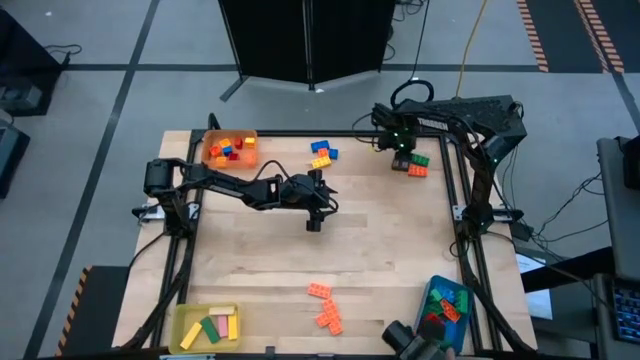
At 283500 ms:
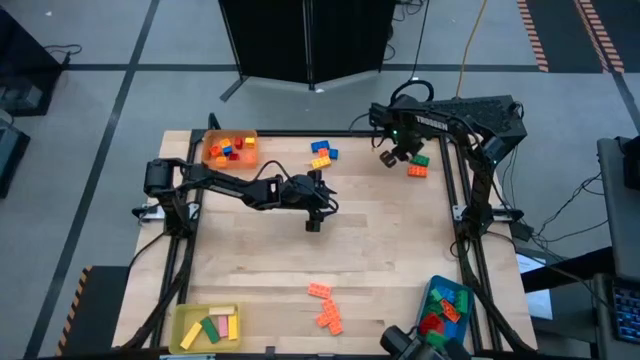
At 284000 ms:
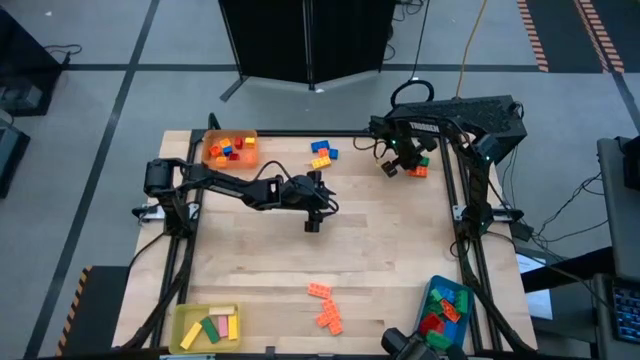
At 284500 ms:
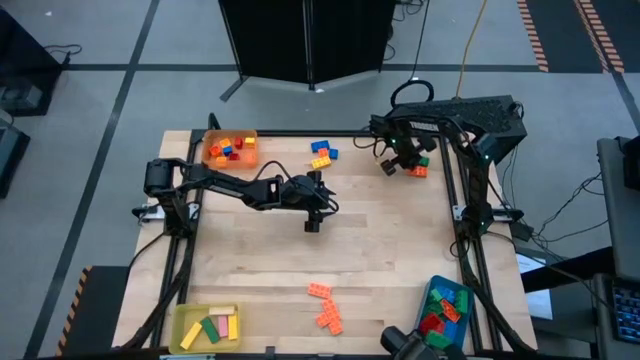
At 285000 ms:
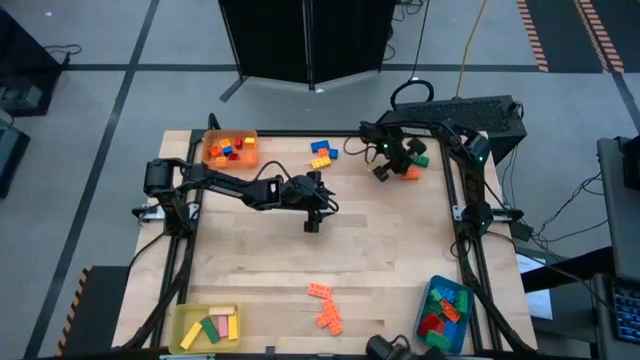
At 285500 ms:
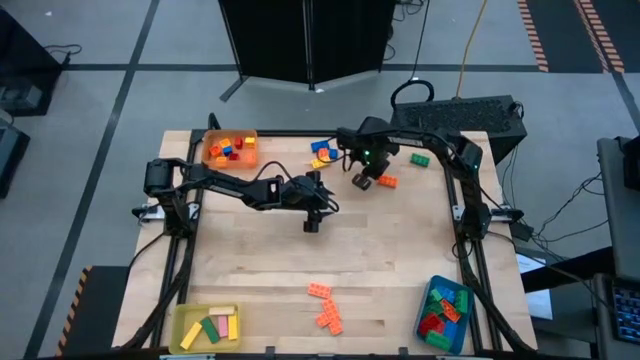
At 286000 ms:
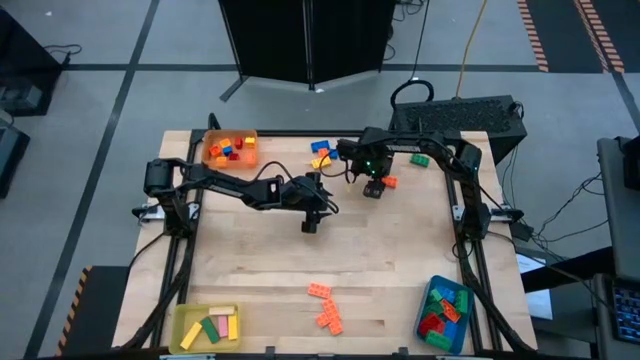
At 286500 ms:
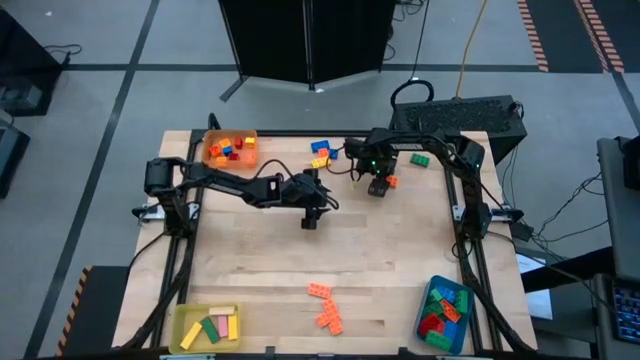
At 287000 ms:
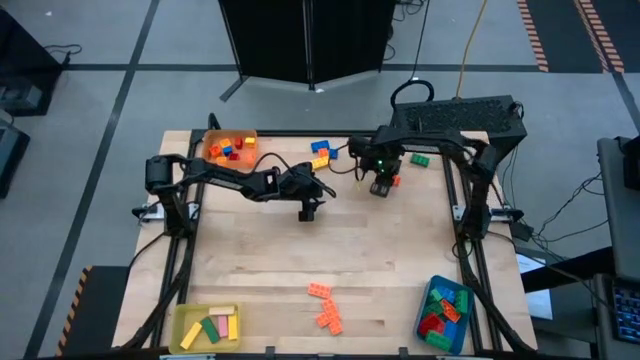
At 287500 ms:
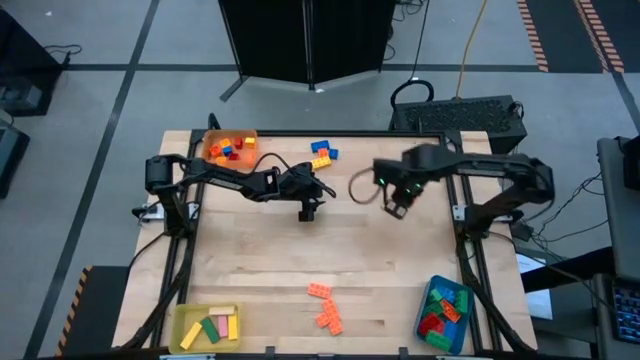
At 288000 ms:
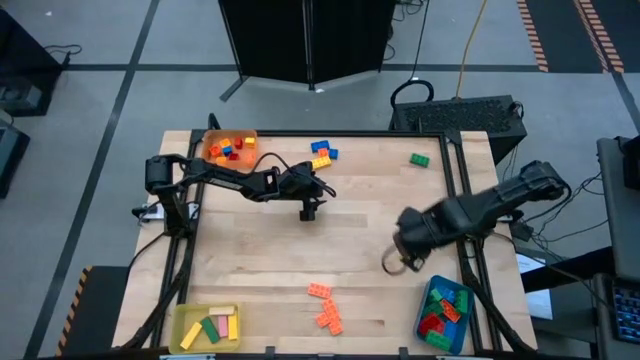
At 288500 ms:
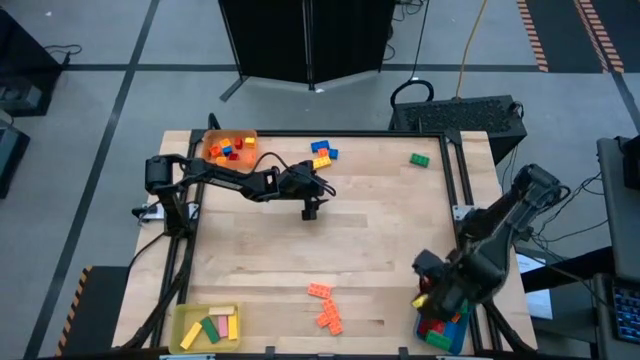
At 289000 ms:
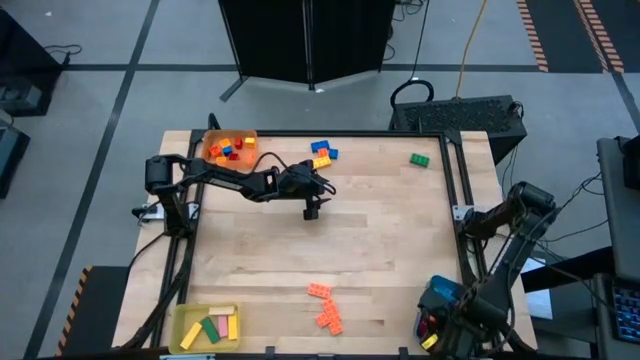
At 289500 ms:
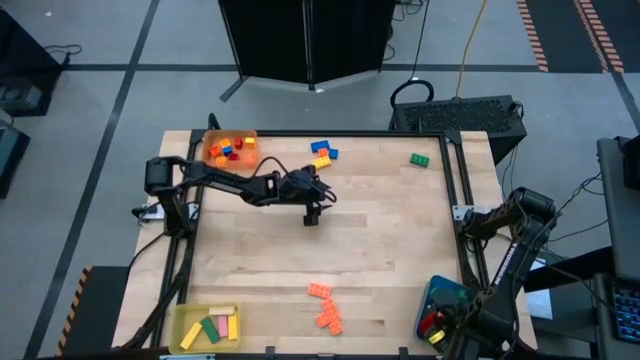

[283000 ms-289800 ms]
Task: Sort blocks by size
Put the orange 8 stud game piece into the blue bin

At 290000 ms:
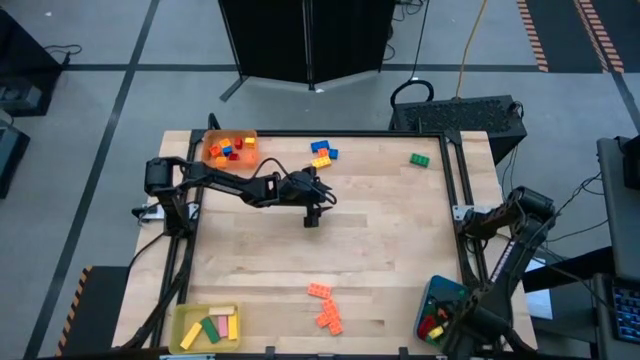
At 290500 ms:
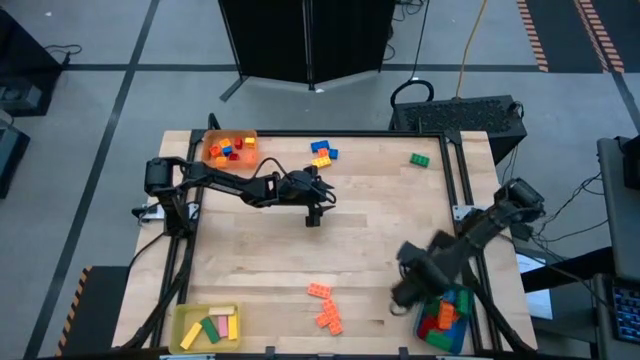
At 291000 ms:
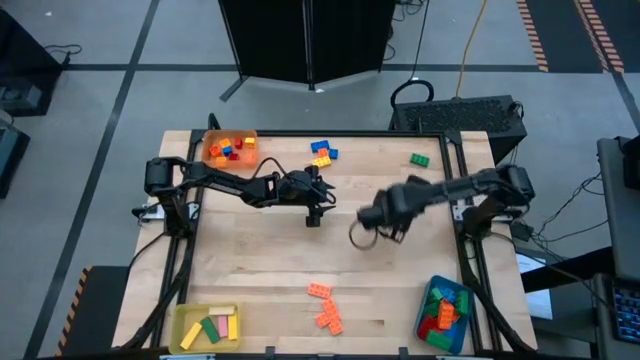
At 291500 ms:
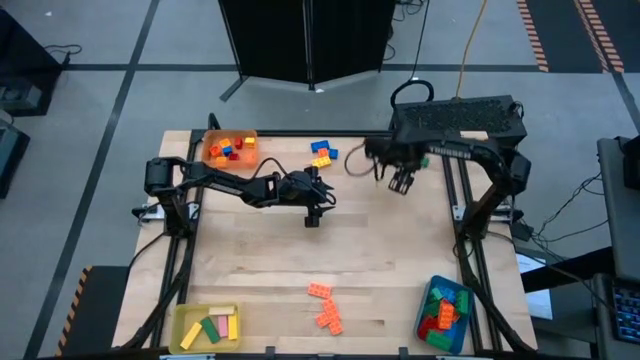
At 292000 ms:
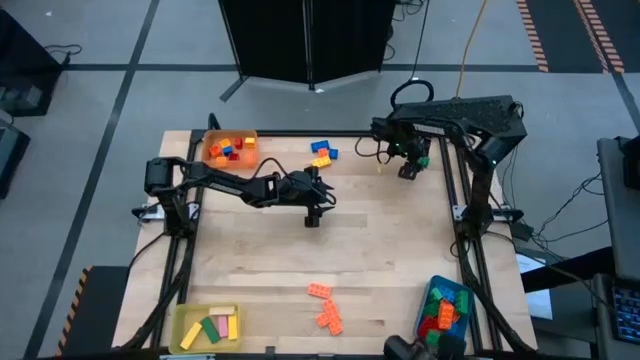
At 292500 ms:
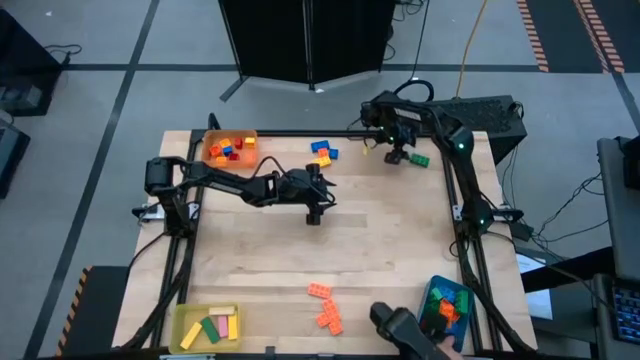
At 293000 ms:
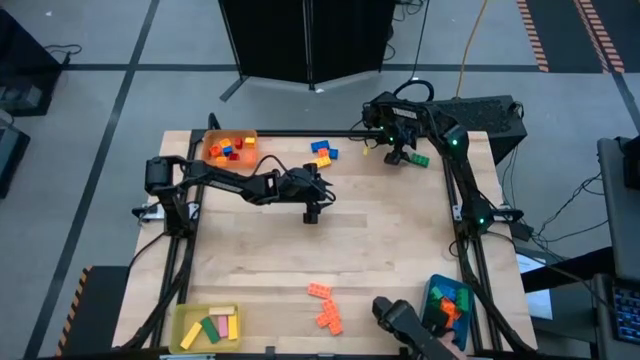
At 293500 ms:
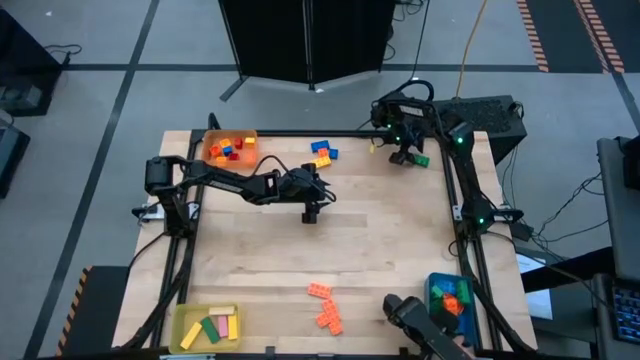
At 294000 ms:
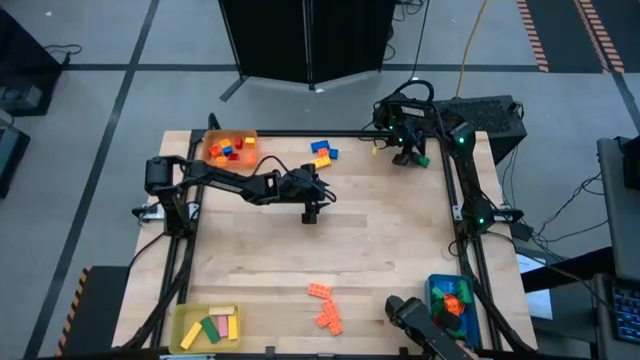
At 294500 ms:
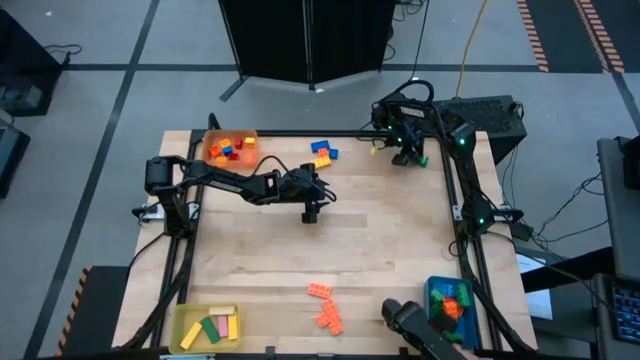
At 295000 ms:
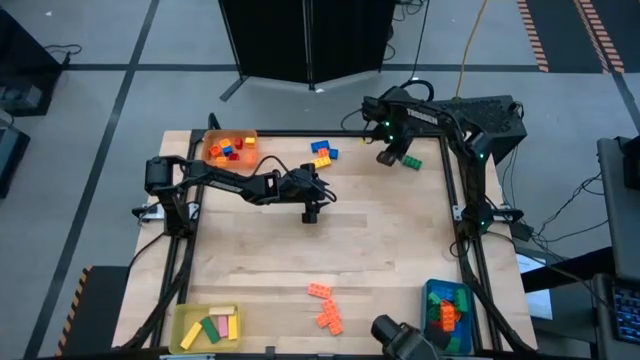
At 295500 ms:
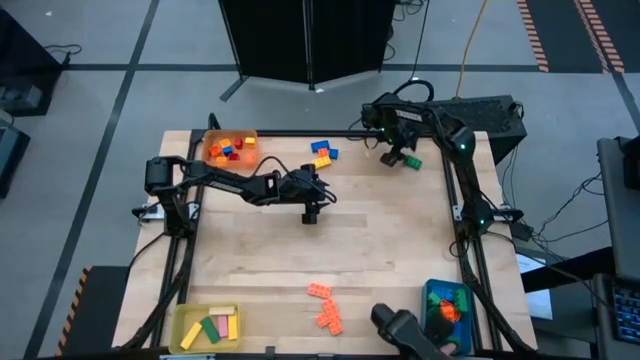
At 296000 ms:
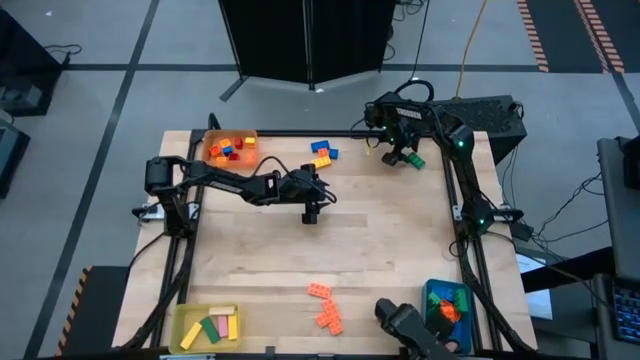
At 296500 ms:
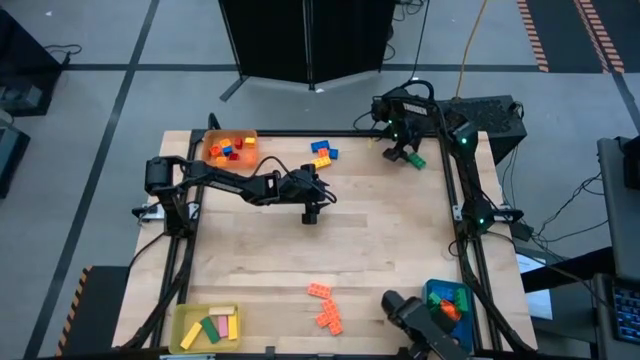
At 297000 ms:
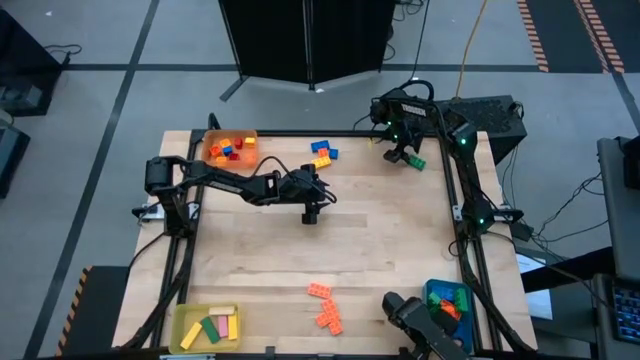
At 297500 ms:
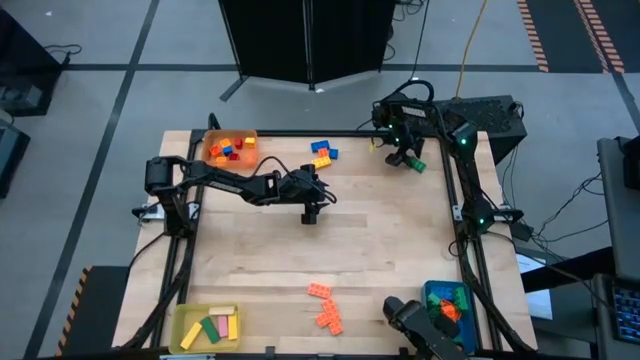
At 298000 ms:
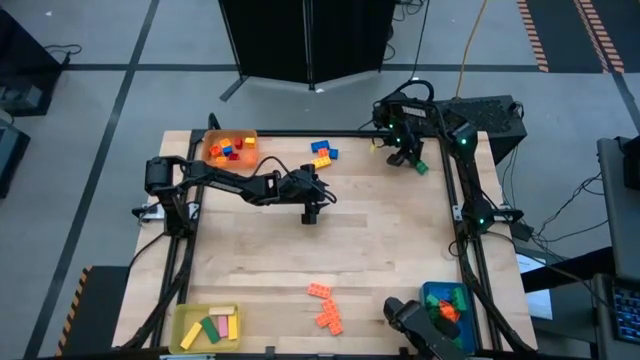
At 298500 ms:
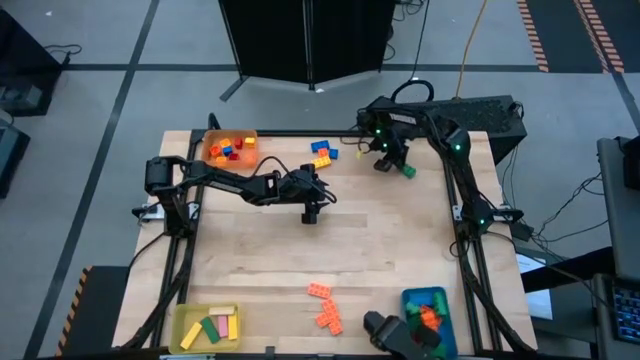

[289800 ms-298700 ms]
Put the green 8 stud game piece into the blue bin

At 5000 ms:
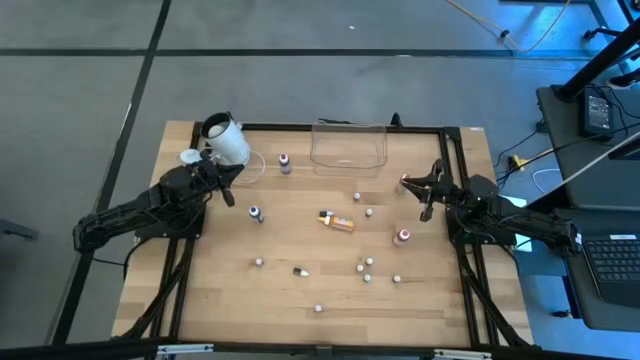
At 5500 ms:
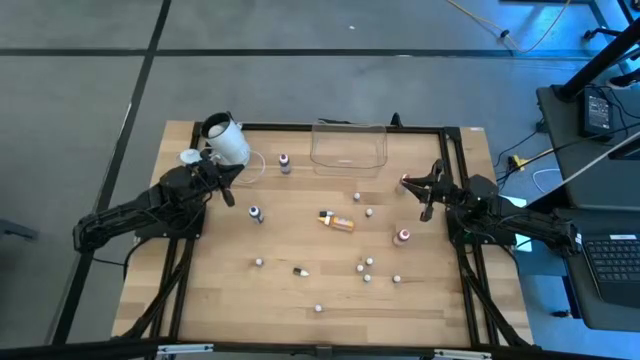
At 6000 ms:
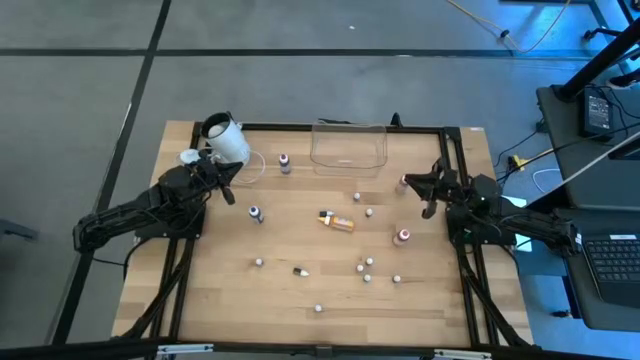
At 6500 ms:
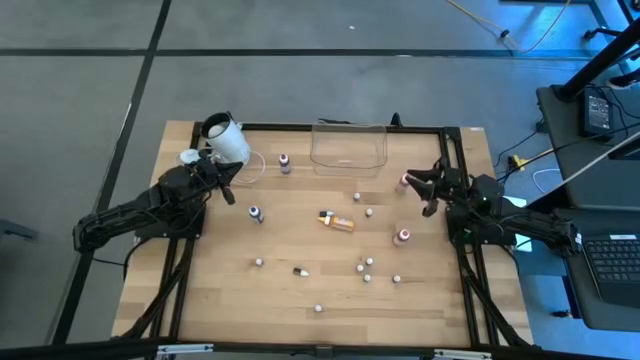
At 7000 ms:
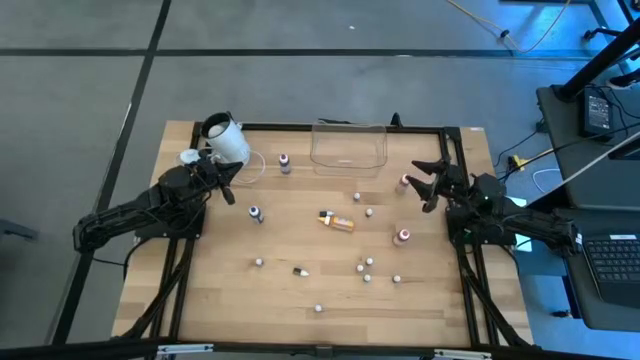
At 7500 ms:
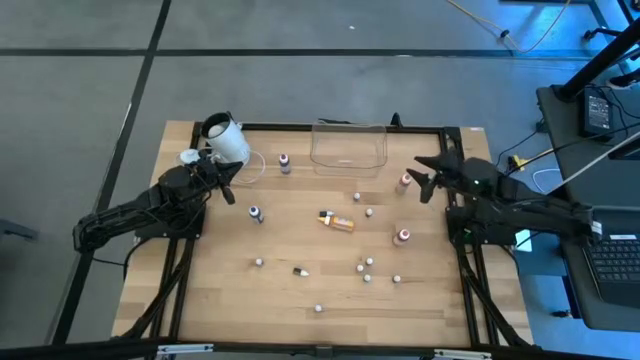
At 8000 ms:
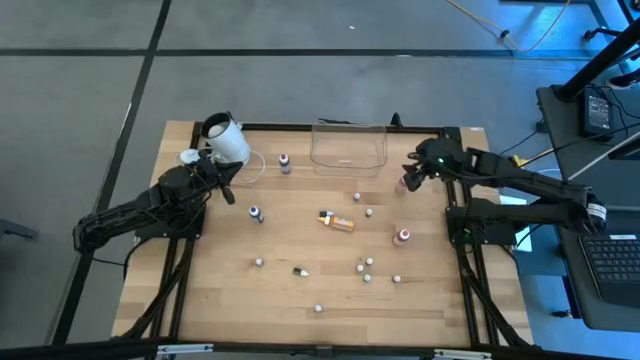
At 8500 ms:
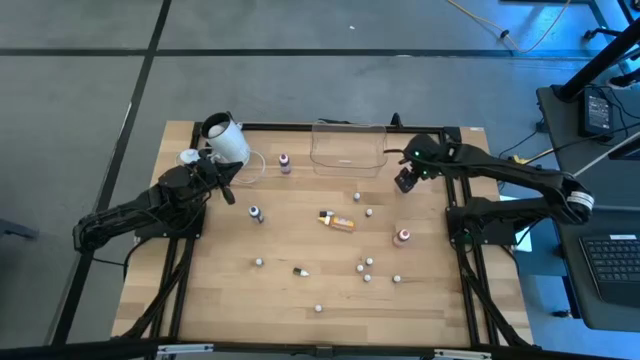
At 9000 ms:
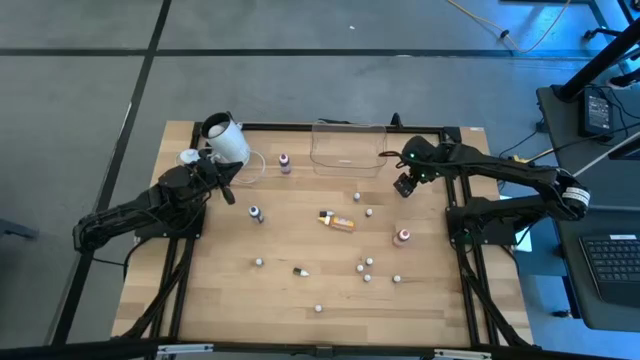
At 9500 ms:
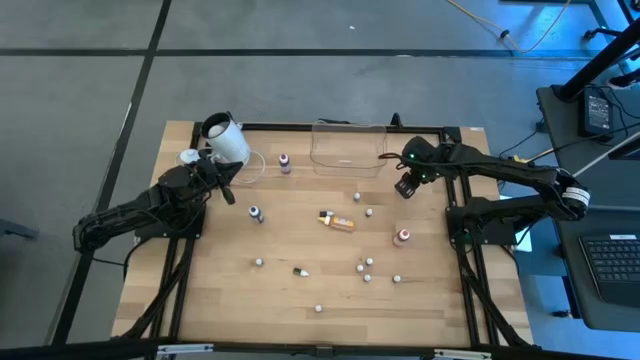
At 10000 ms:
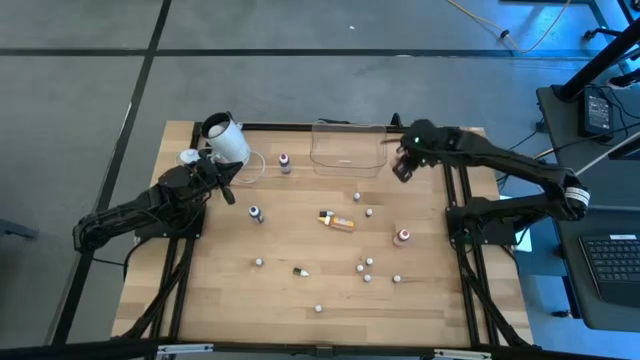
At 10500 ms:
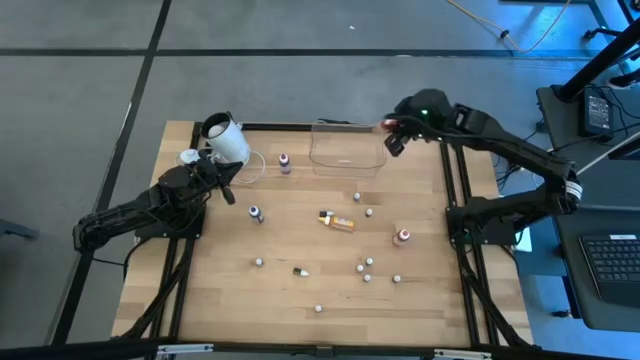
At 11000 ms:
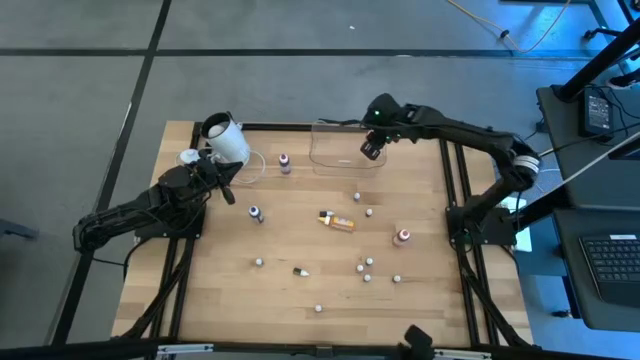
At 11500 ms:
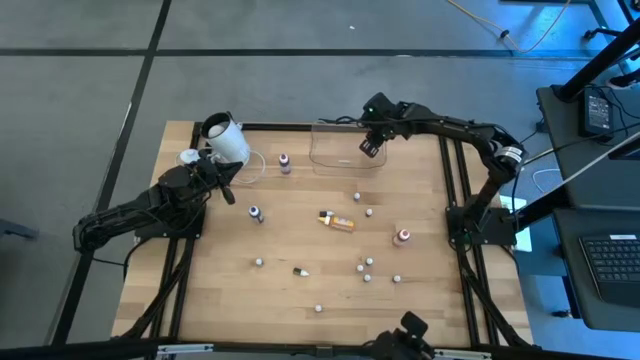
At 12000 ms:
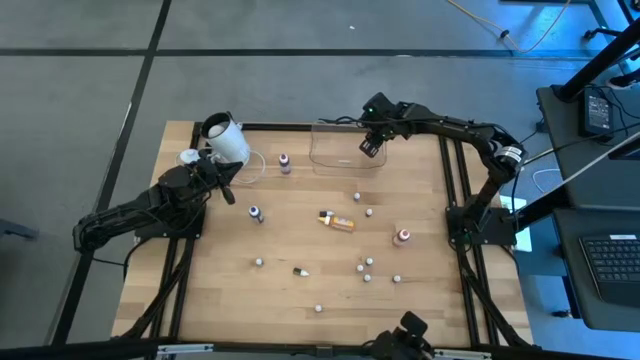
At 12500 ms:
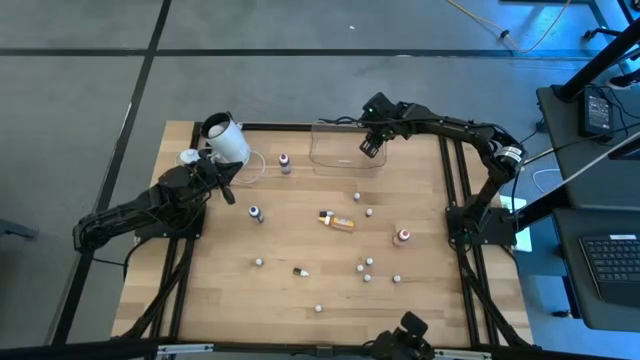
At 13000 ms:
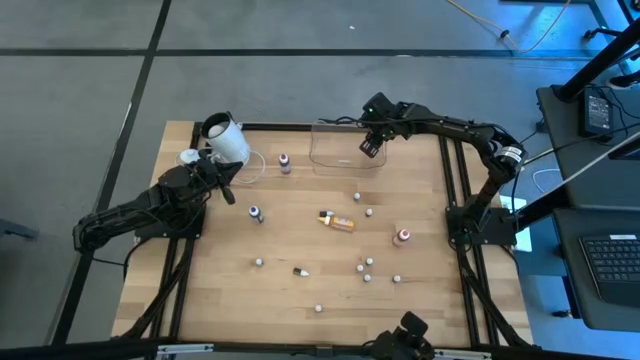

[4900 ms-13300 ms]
Task: Pick & Place food coloring
Put the large orange food coloring bottle into the transparent container
